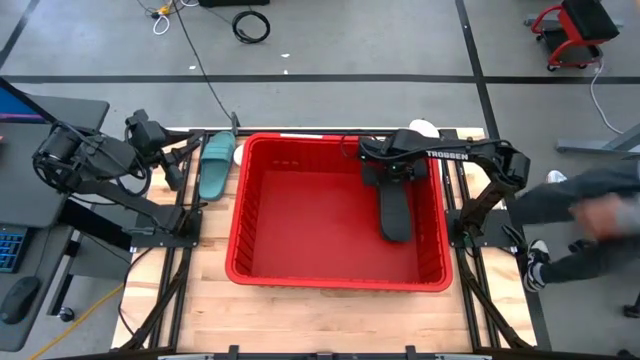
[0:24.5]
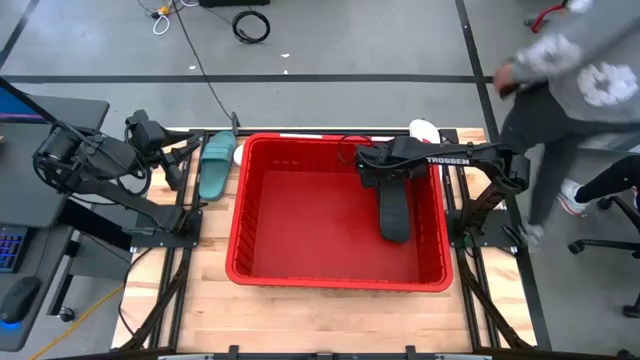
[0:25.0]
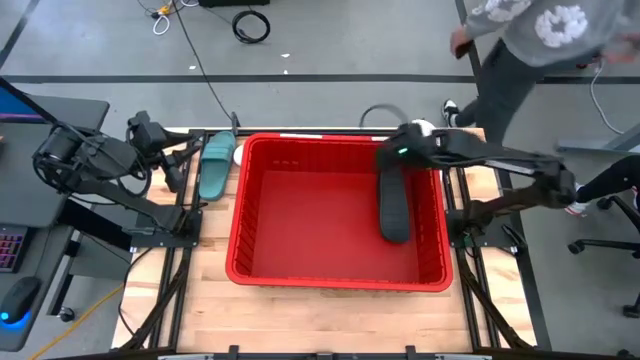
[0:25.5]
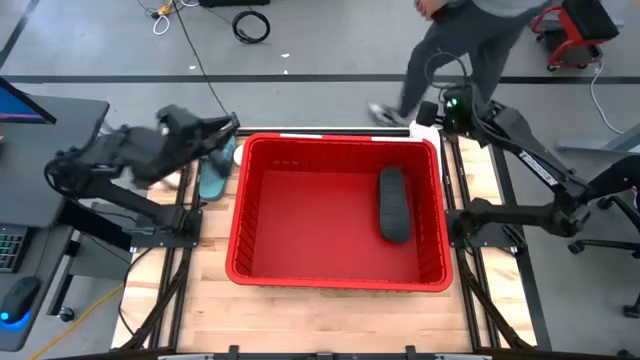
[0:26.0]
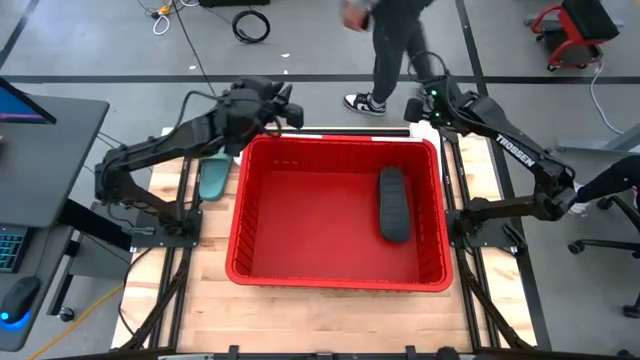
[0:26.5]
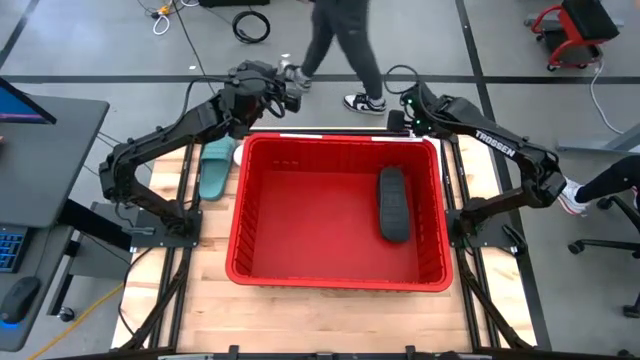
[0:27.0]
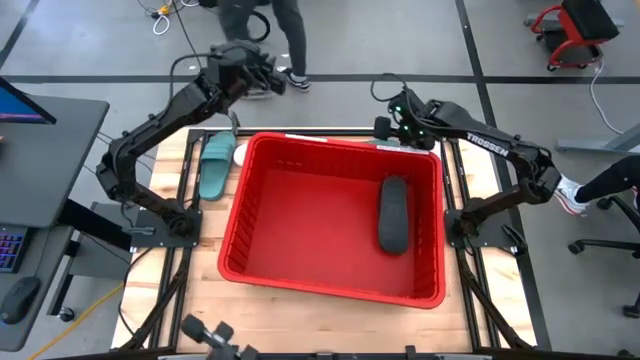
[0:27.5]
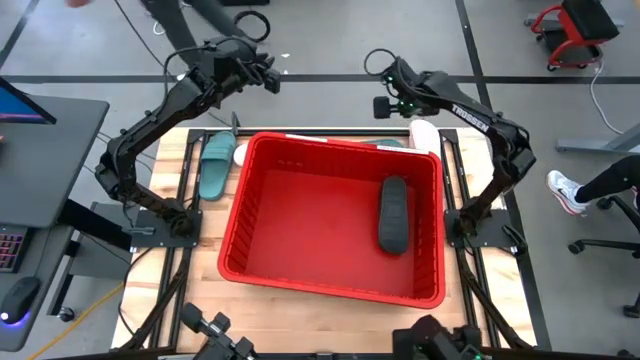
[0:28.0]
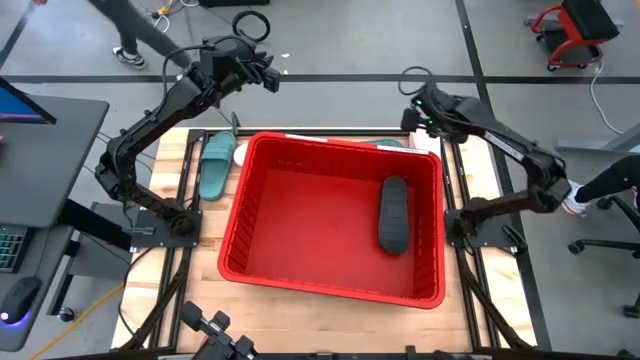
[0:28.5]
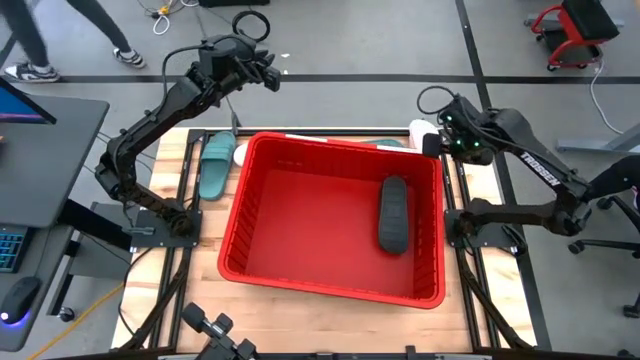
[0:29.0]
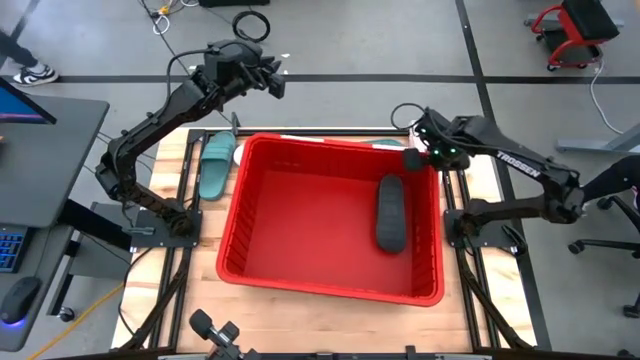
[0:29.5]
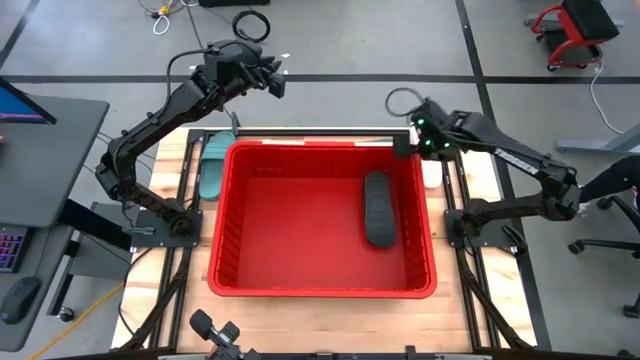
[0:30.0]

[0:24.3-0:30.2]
Task: Pick and place slides into bin
Adjust the red bin on the table

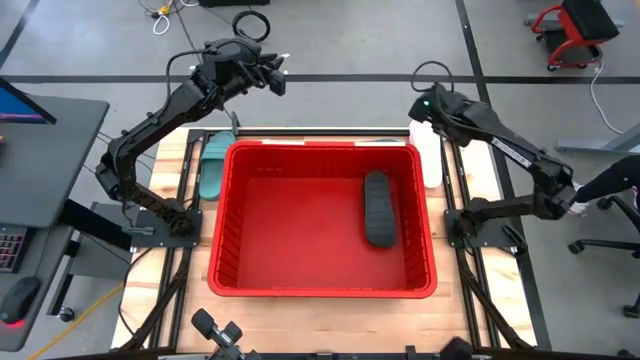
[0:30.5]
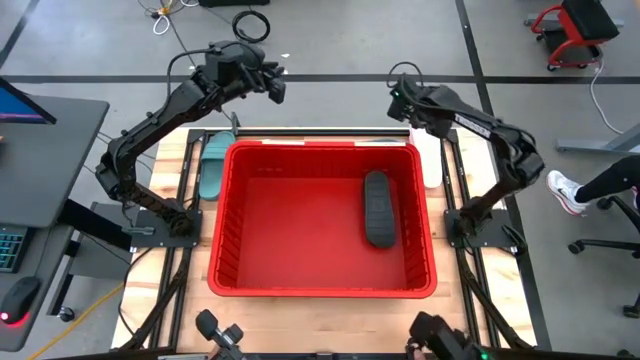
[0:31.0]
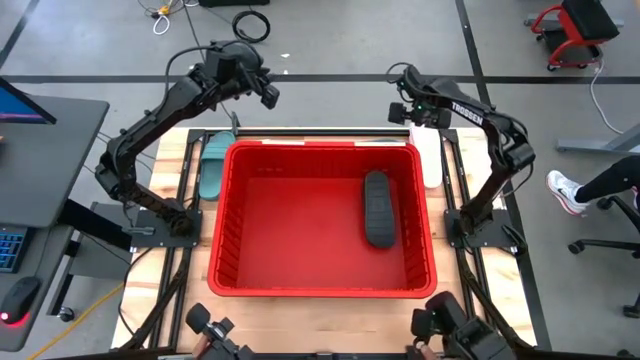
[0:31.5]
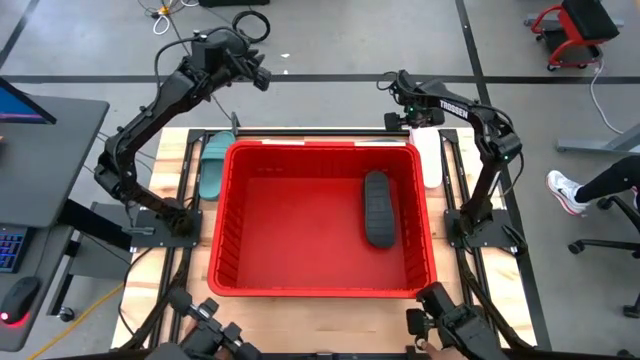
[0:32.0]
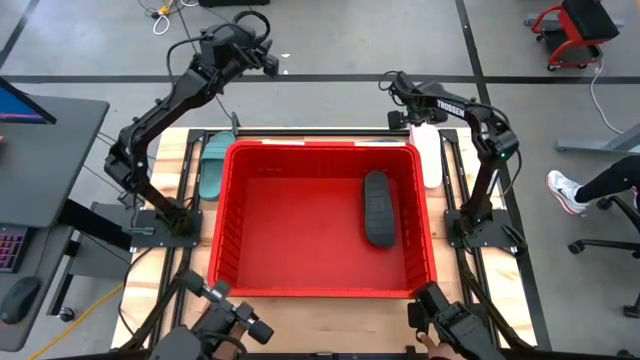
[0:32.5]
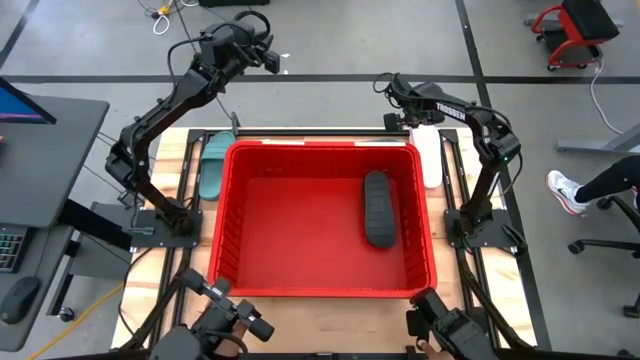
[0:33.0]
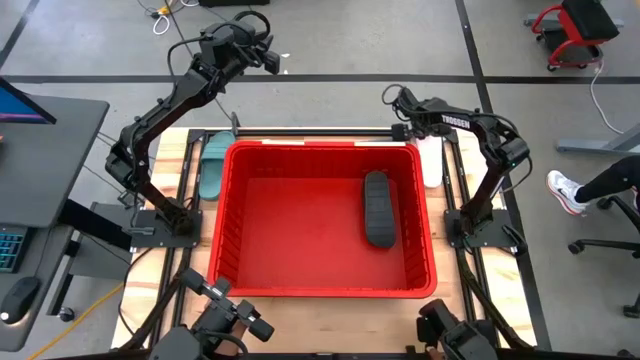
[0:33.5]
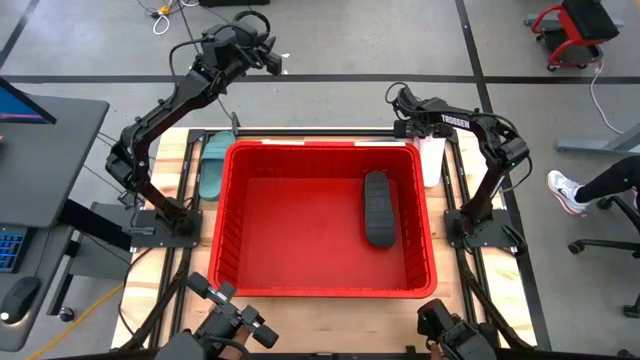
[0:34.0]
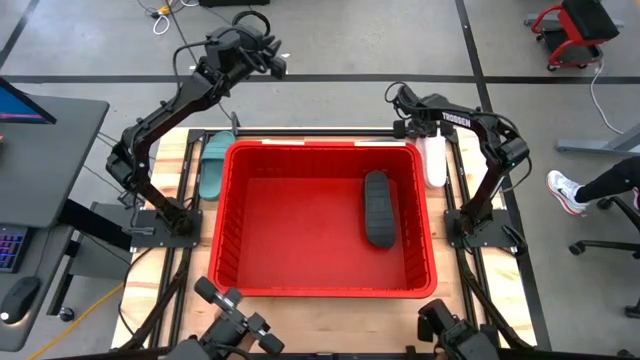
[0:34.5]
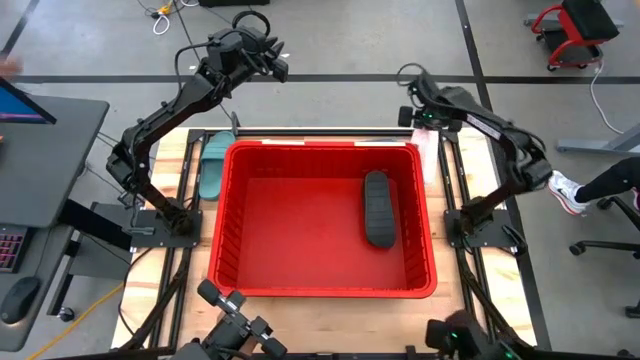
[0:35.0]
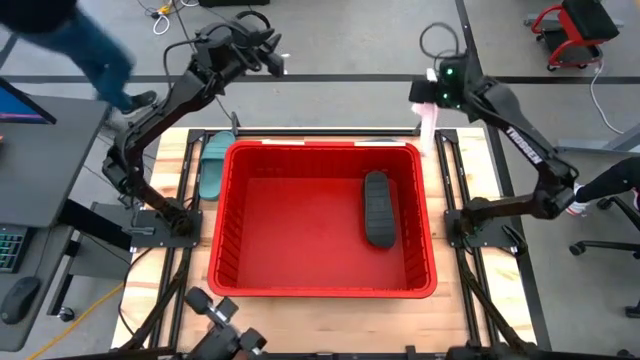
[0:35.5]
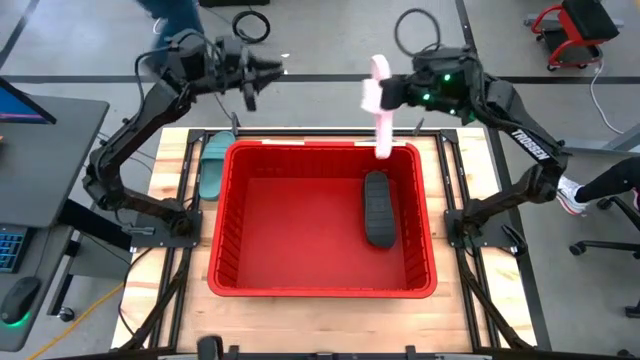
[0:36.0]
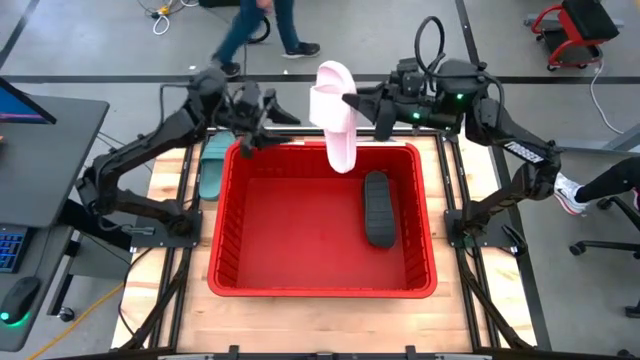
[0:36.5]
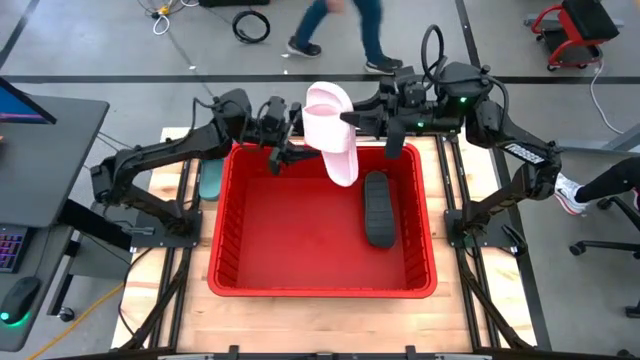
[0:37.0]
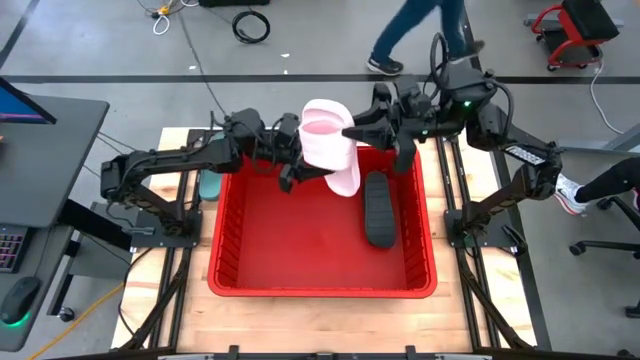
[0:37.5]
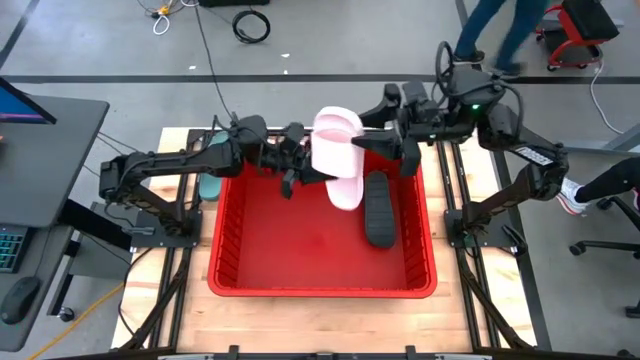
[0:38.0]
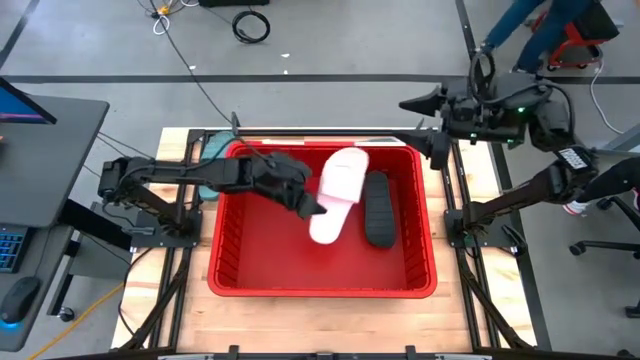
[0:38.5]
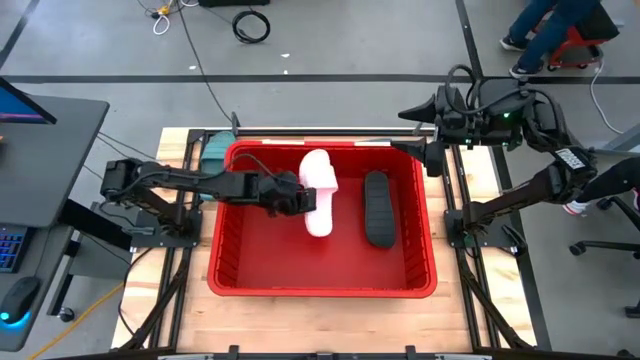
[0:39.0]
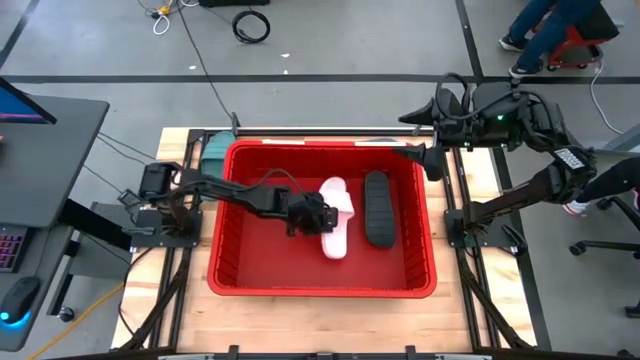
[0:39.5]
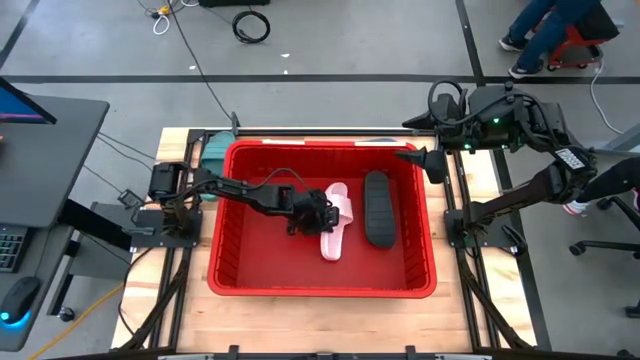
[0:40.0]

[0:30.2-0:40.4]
Put the right pink slide into the red bin

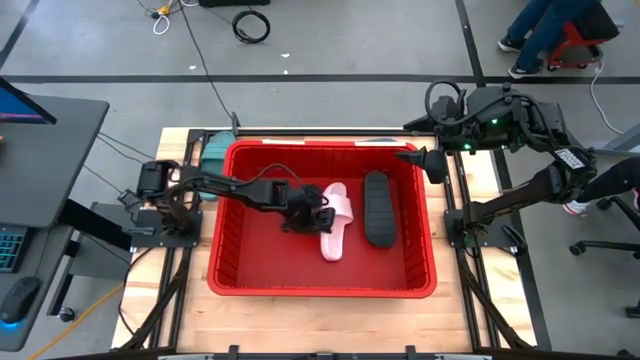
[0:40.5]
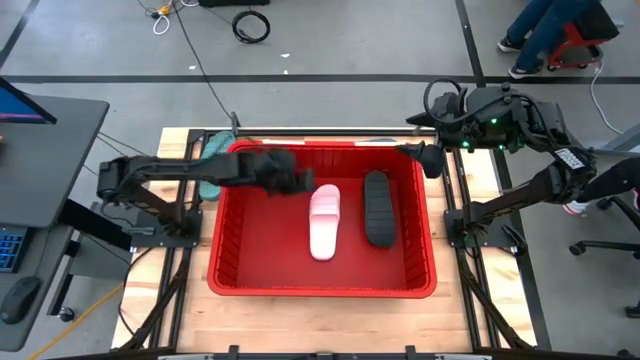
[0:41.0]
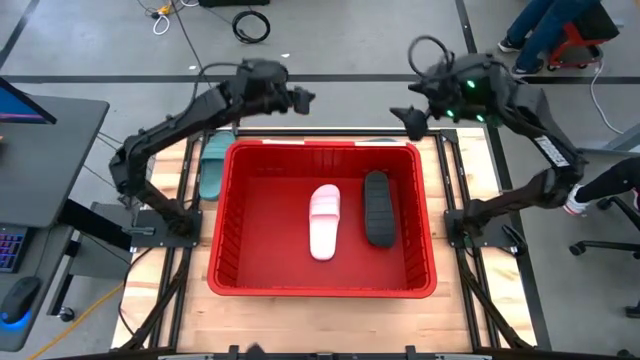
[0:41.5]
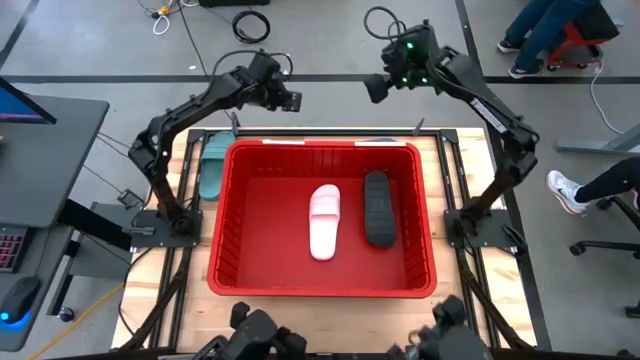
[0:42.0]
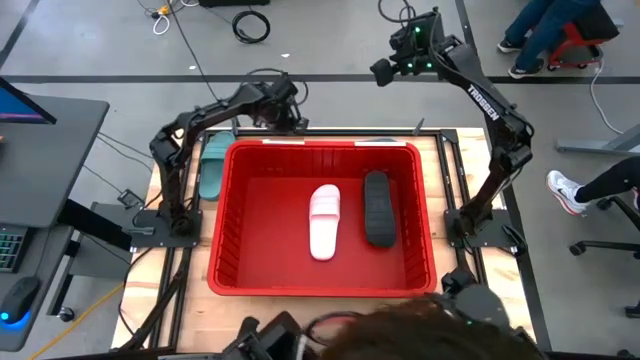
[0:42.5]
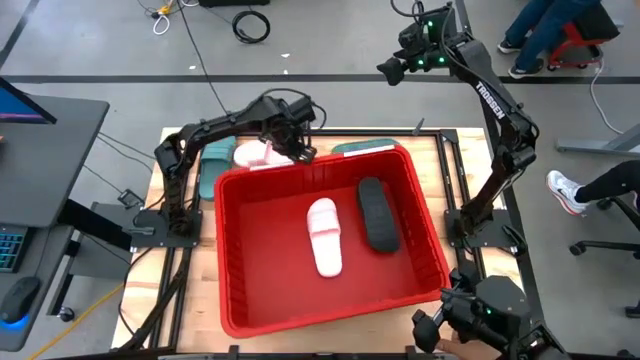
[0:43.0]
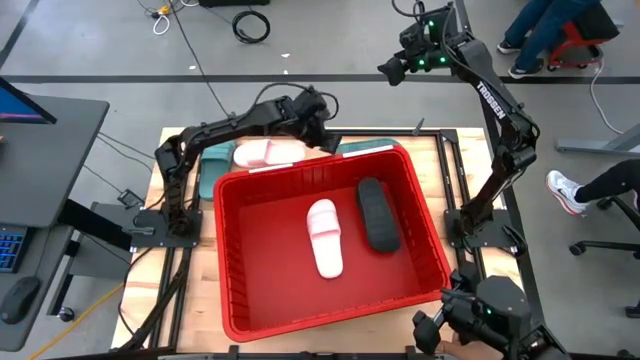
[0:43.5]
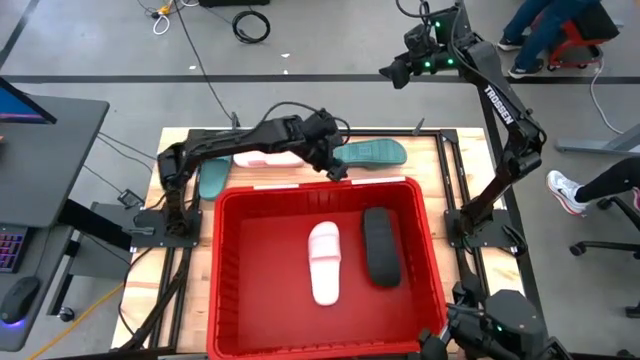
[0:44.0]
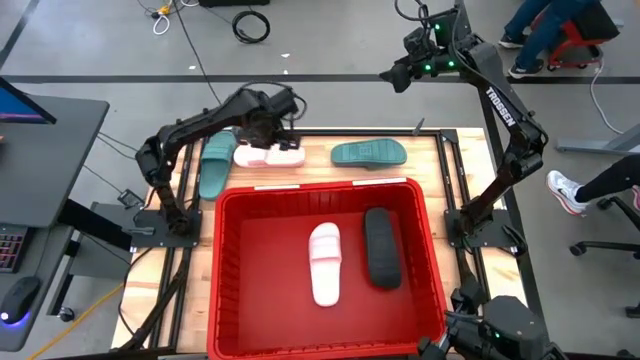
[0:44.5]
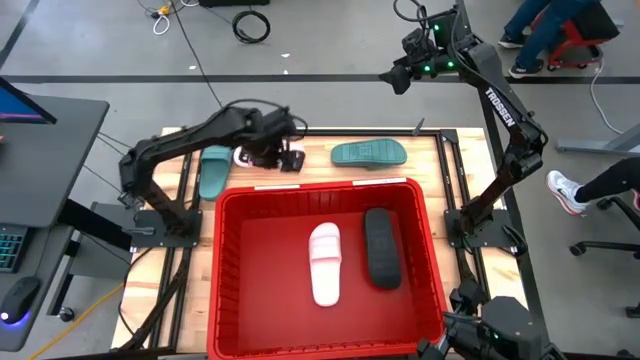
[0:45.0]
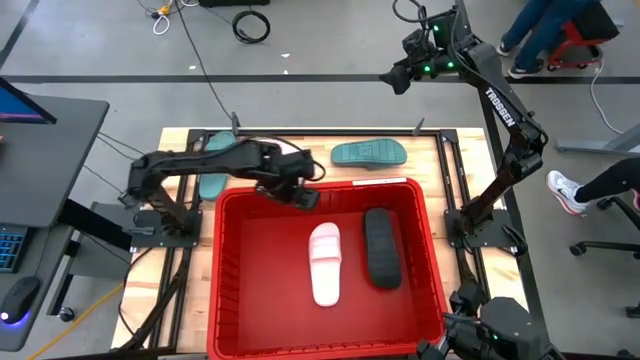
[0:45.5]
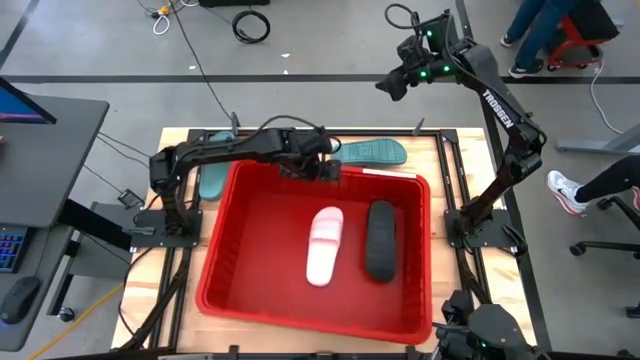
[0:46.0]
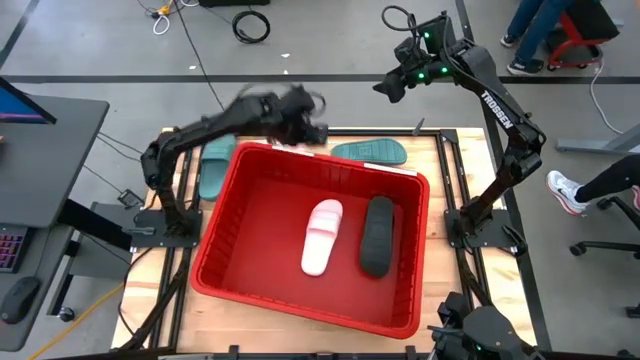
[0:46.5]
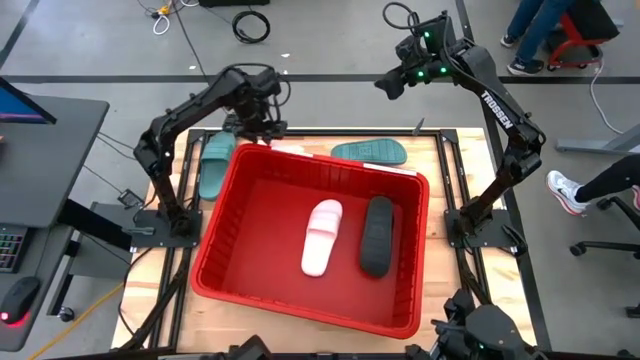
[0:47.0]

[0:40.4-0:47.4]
Adjust the red bin on the table
